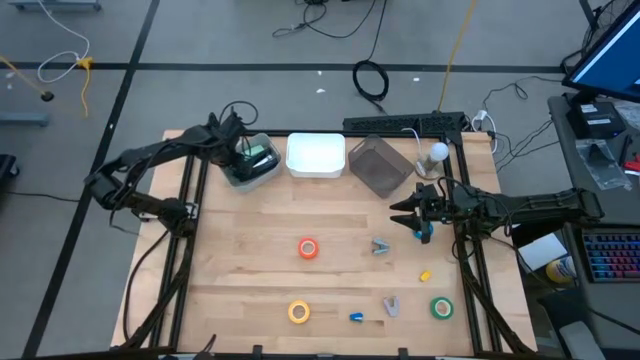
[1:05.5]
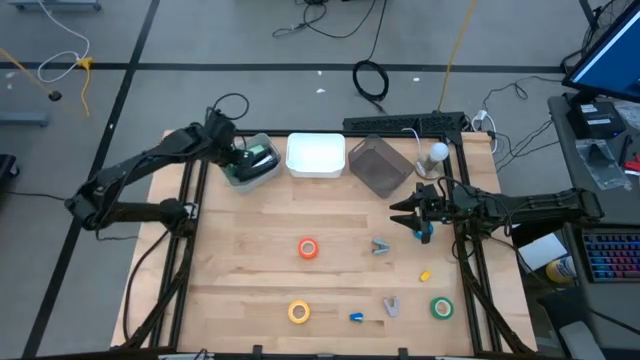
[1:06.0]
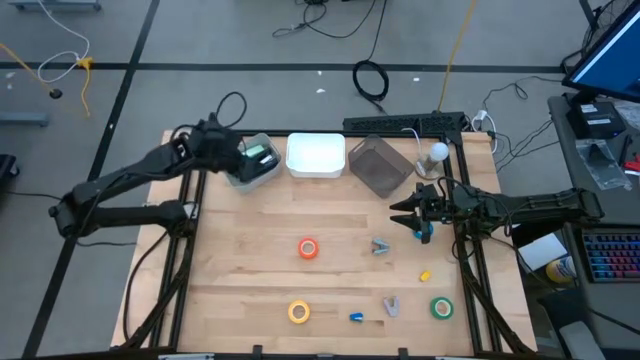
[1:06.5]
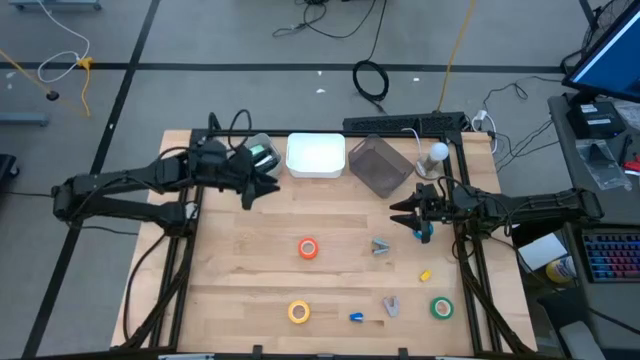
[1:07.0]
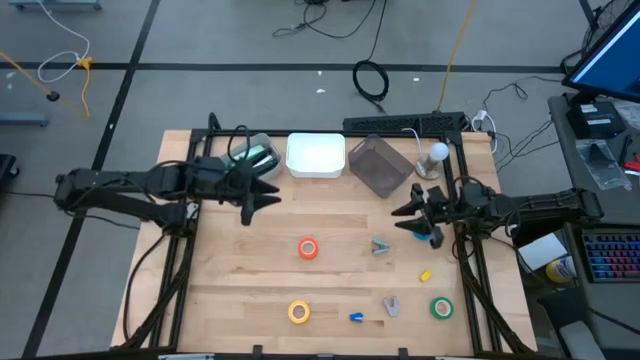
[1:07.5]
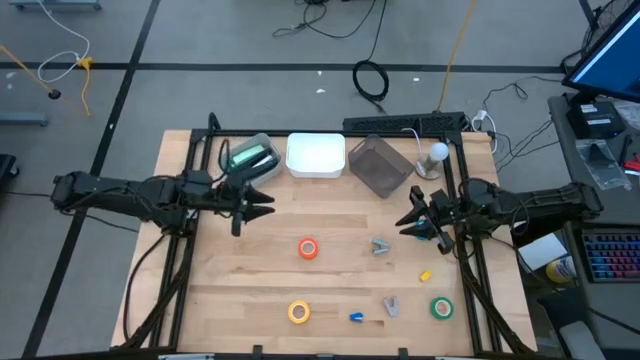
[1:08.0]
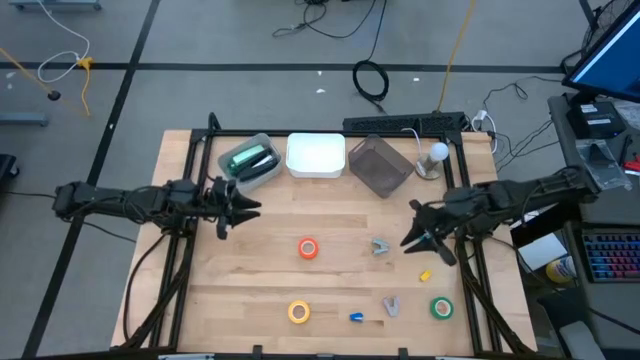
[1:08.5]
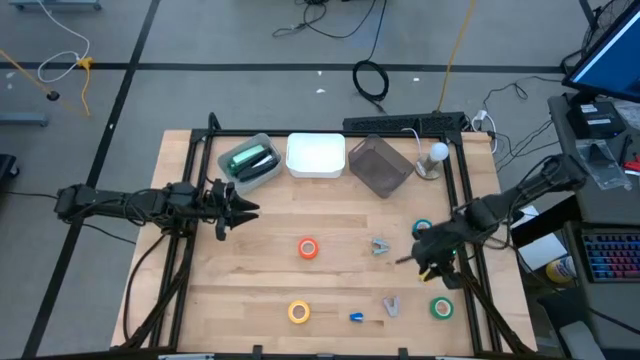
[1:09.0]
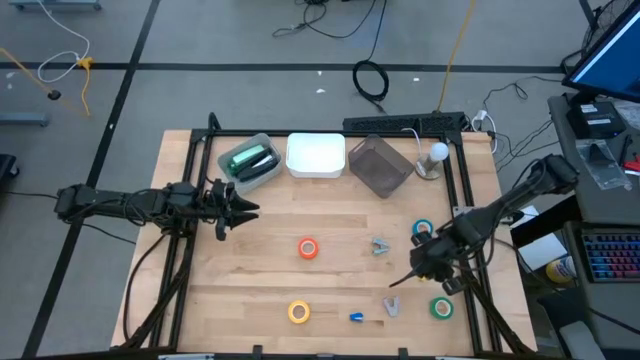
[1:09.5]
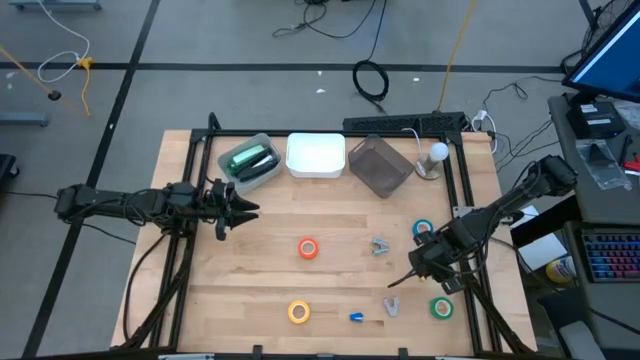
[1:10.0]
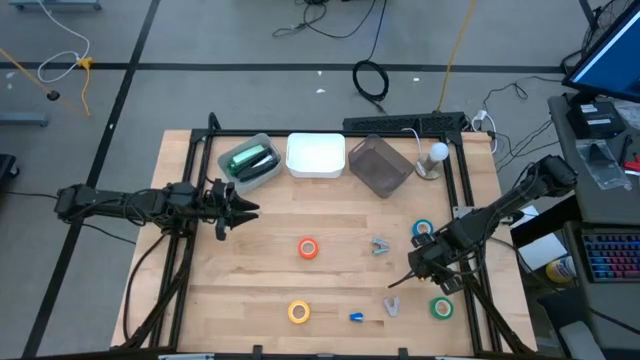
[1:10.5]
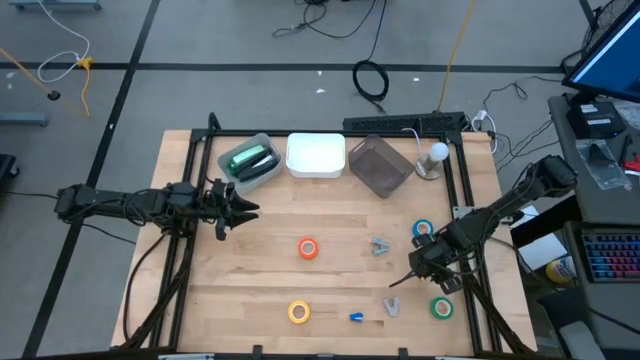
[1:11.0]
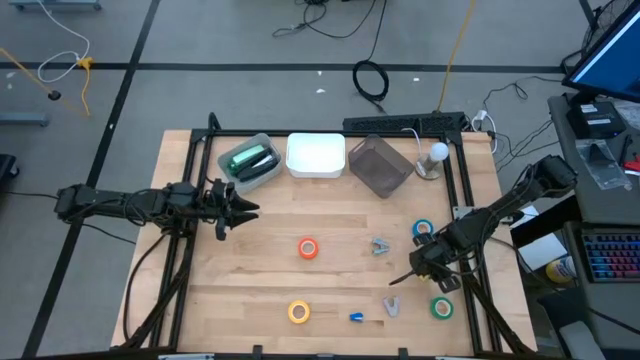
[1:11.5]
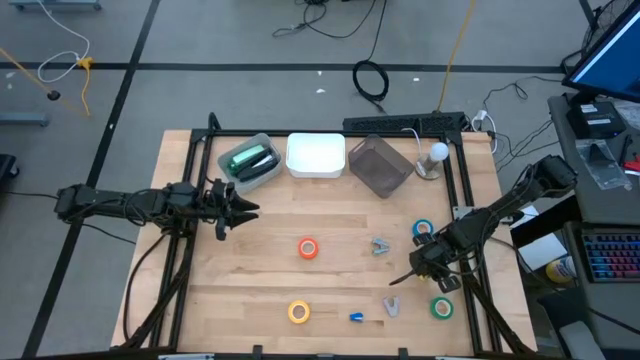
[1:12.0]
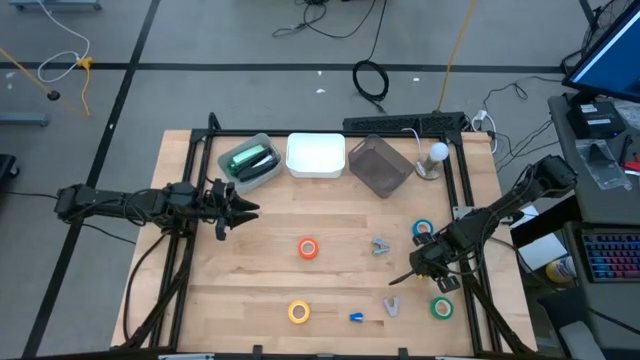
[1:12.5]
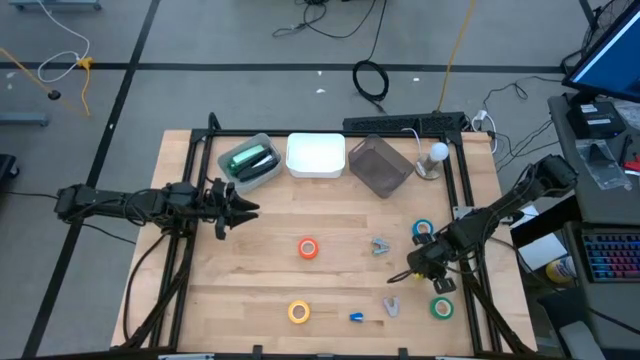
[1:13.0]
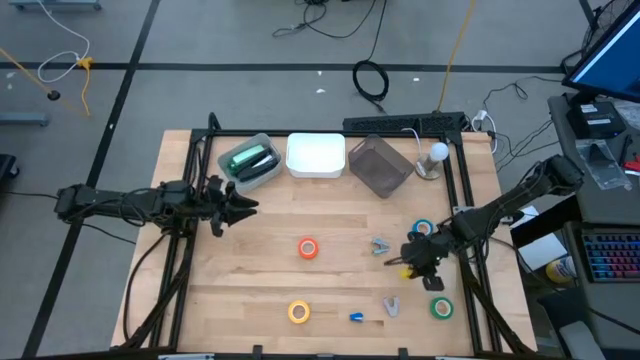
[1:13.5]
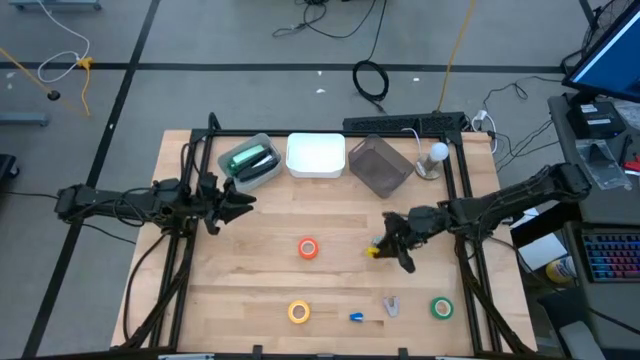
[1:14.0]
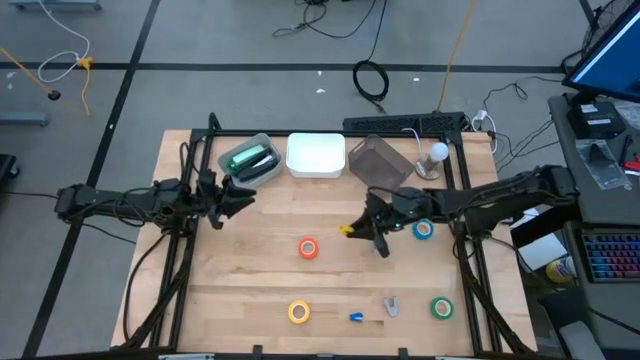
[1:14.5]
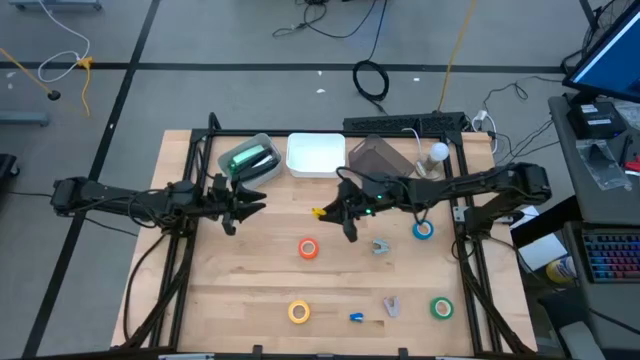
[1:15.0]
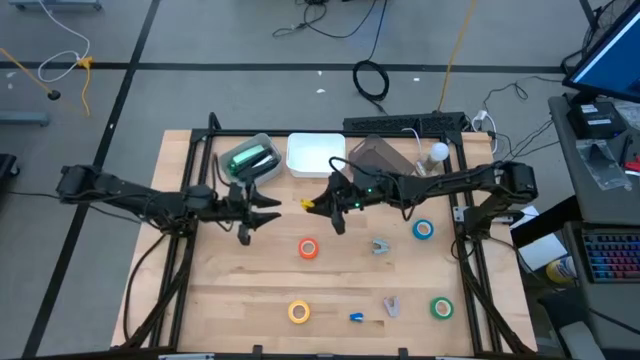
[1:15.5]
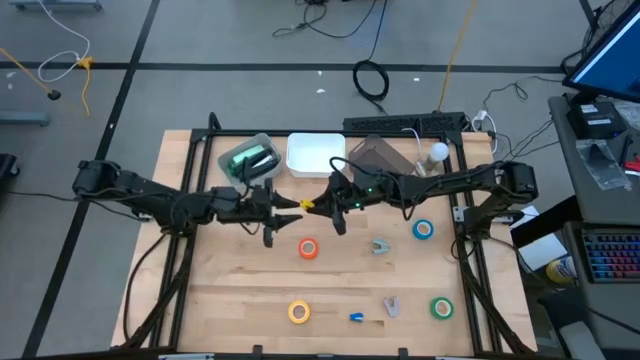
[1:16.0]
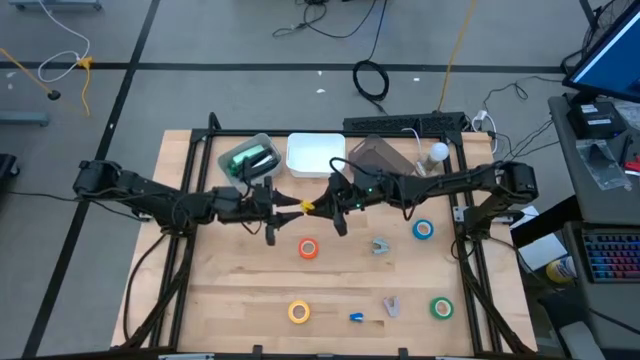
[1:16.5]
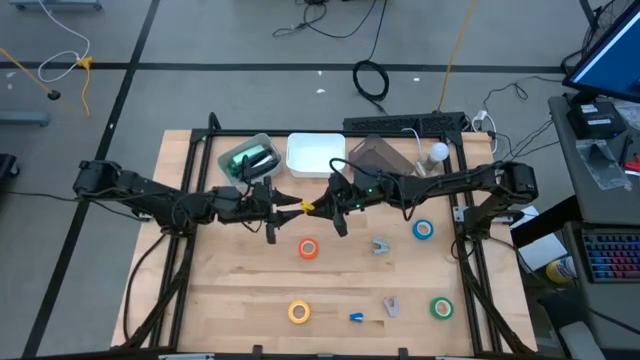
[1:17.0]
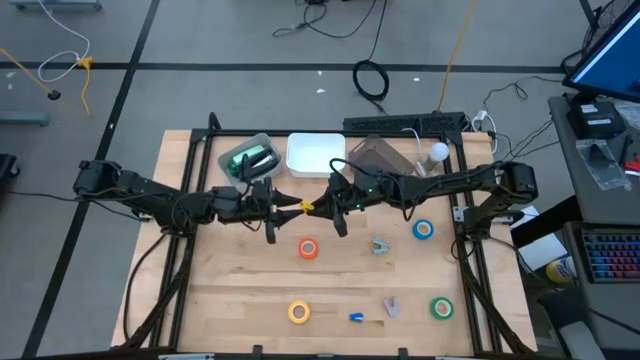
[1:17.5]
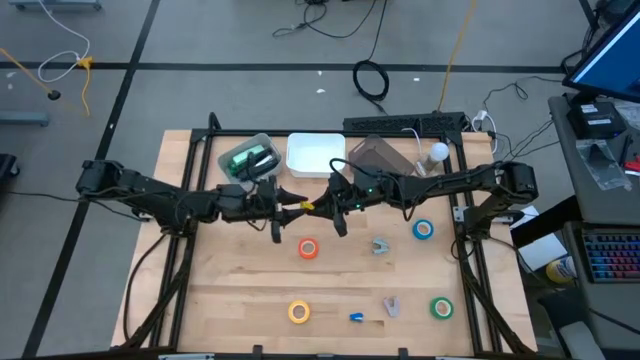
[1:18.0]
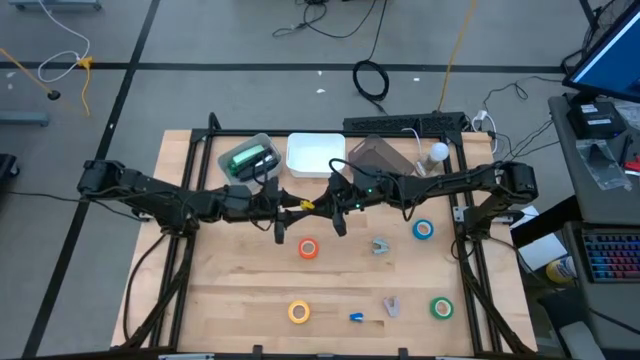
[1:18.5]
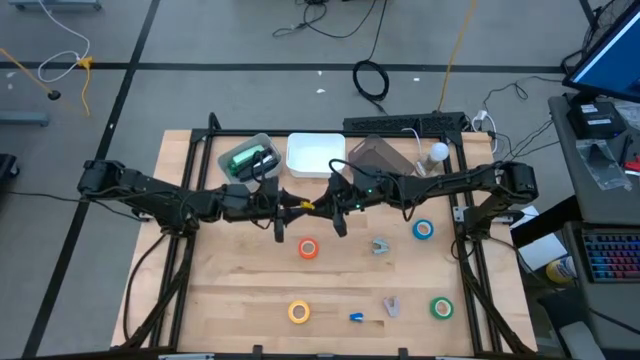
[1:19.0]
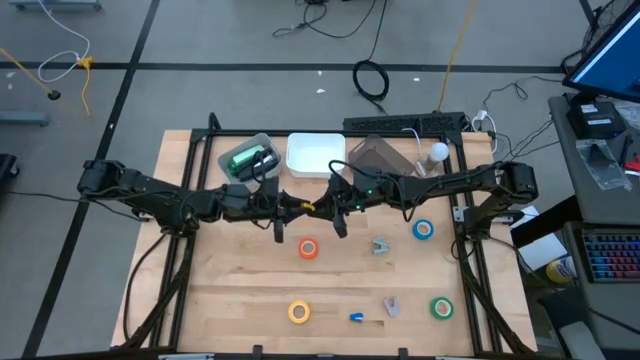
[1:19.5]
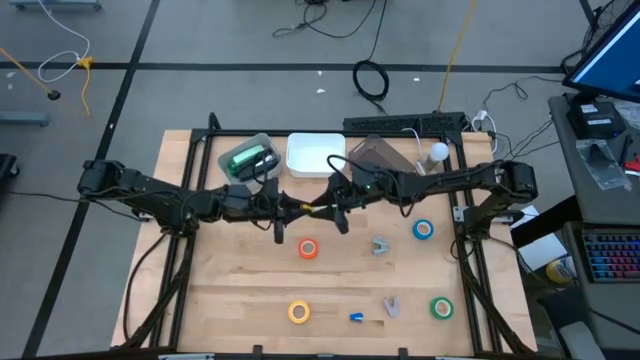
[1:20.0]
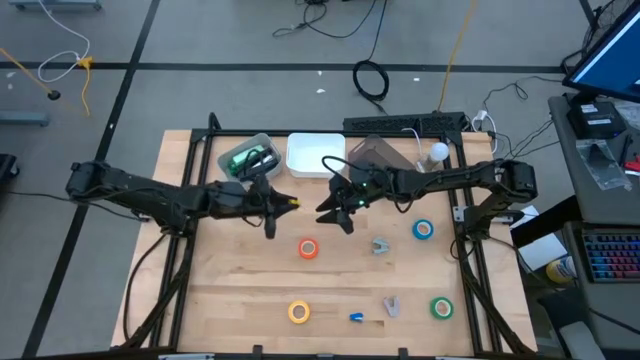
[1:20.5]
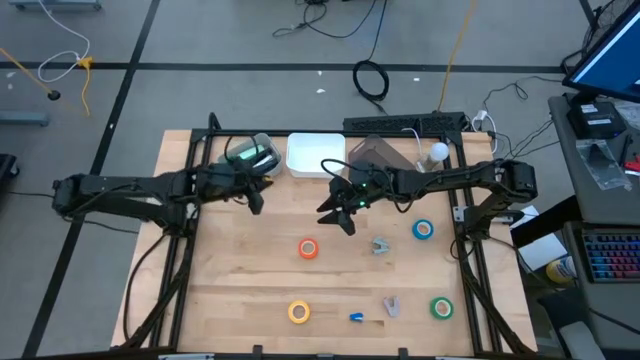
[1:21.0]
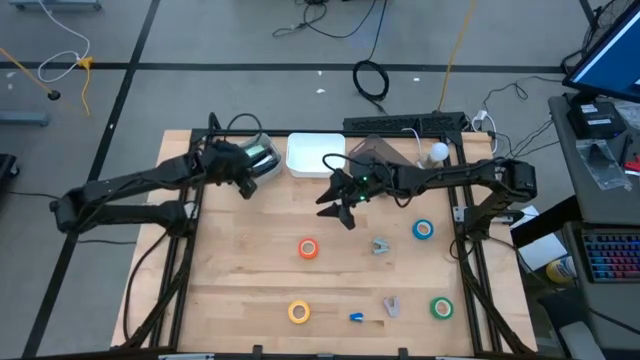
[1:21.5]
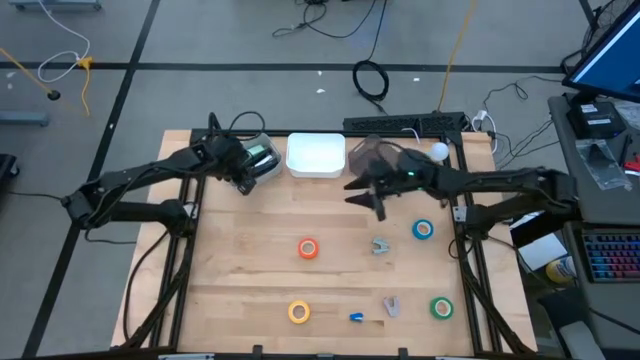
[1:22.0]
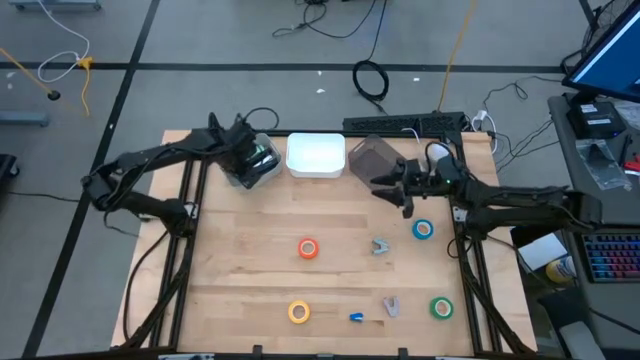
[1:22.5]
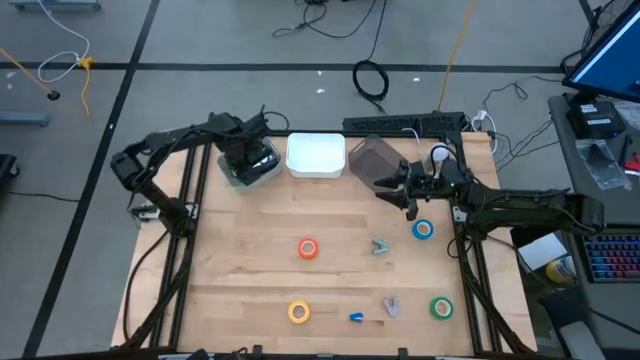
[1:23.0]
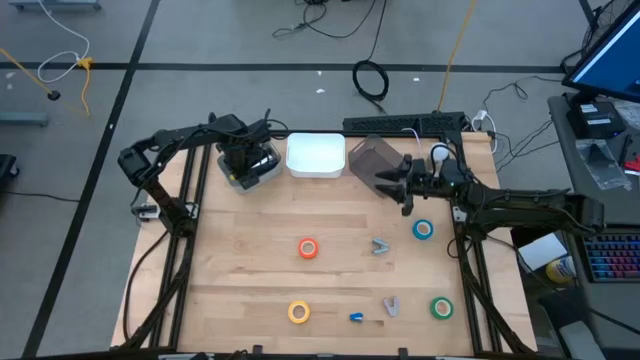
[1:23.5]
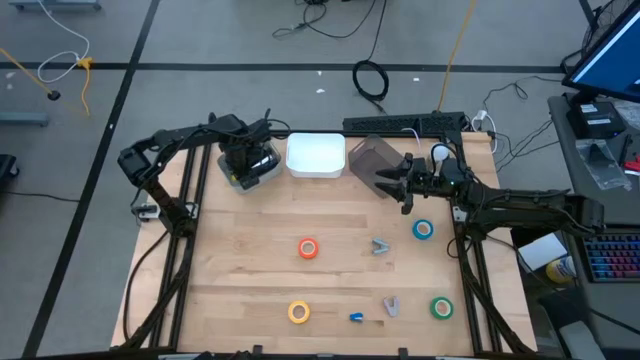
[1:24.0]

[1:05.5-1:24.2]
Task: Pick and place Stapler, Stapler remover, tape
Put the yellow stapler into the gray bin

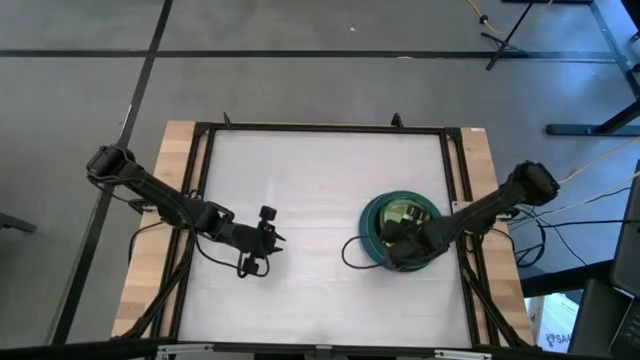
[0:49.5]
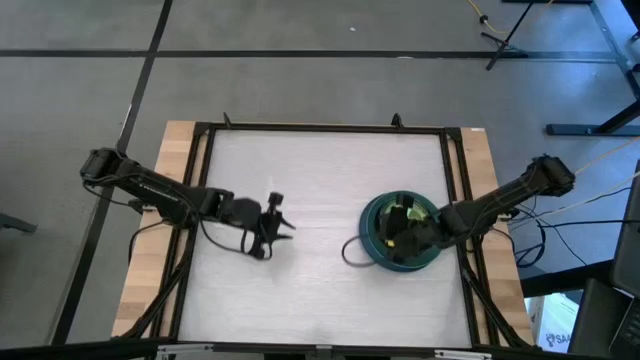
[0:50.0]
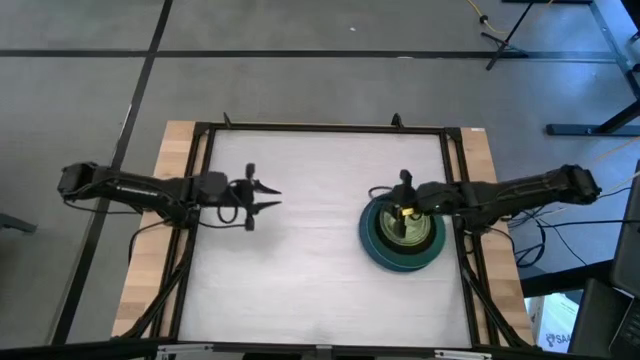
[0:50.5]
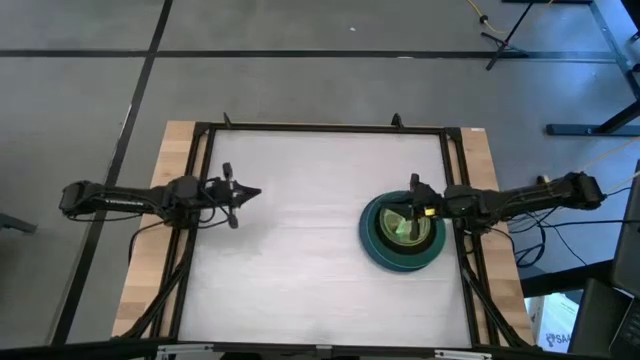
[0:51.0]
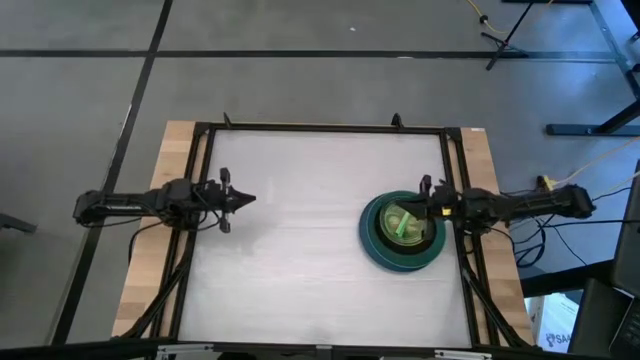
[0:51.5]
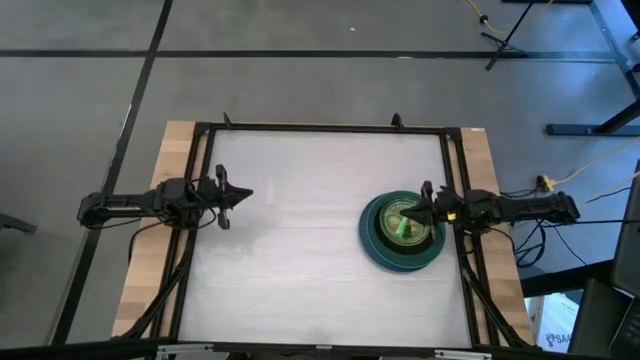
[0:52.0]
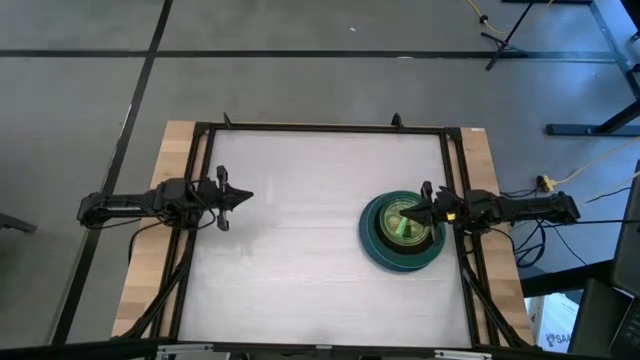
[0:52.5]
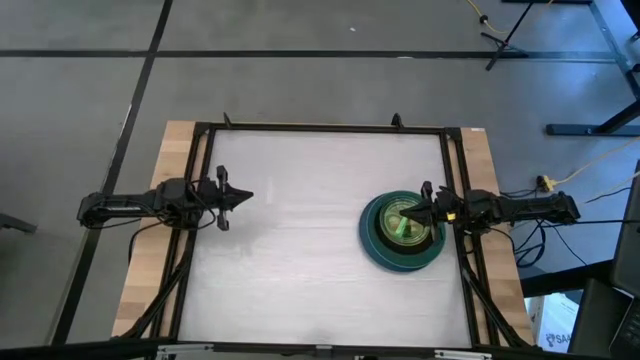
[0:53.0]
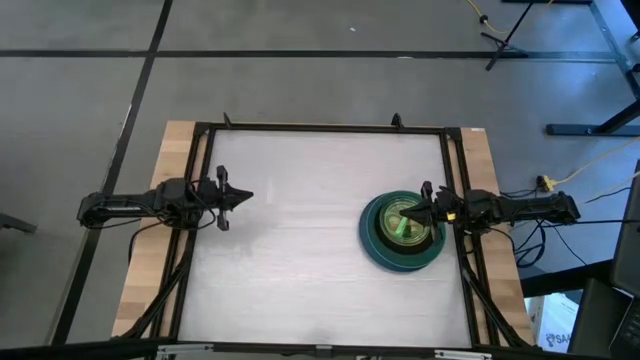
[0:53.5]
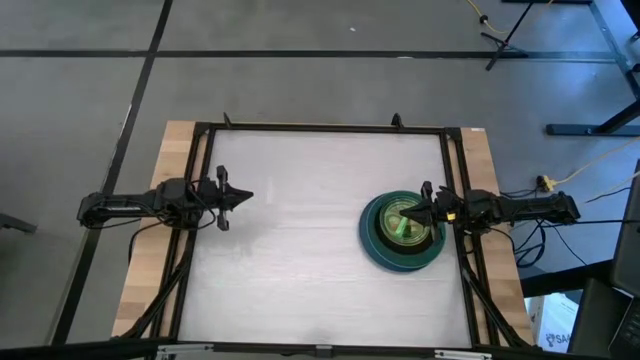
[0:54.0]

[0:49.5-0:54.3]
Task: Stack plastic plates
Return to Home Position
